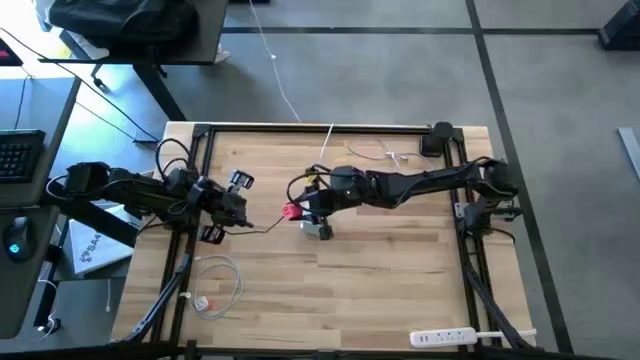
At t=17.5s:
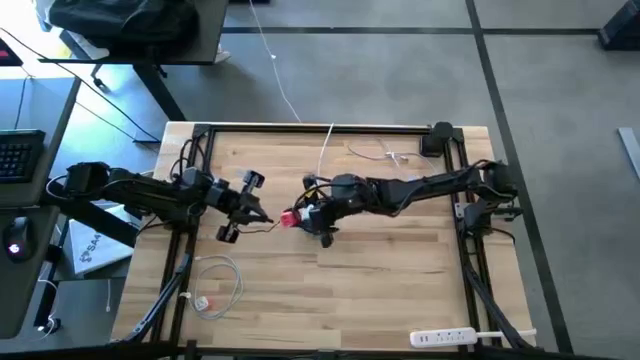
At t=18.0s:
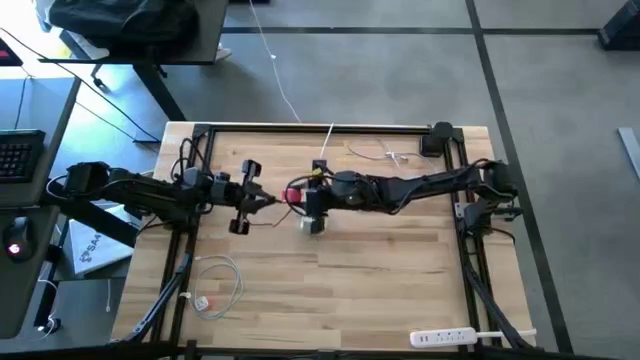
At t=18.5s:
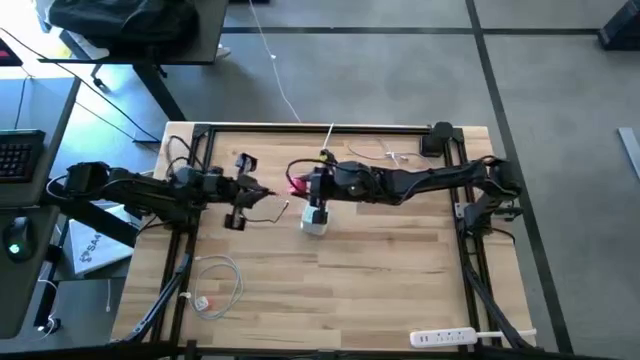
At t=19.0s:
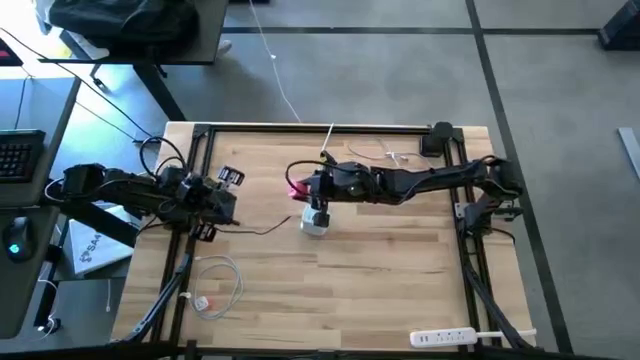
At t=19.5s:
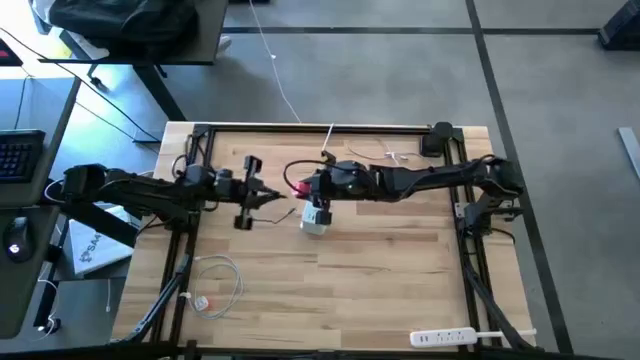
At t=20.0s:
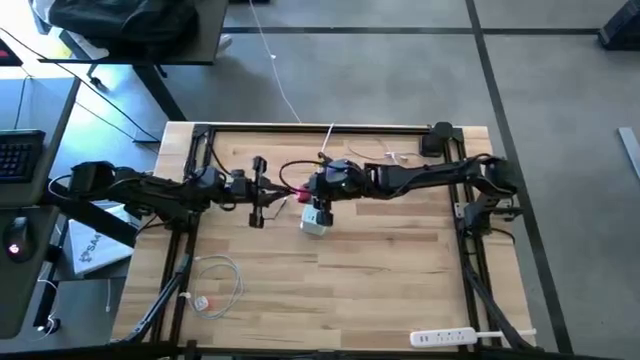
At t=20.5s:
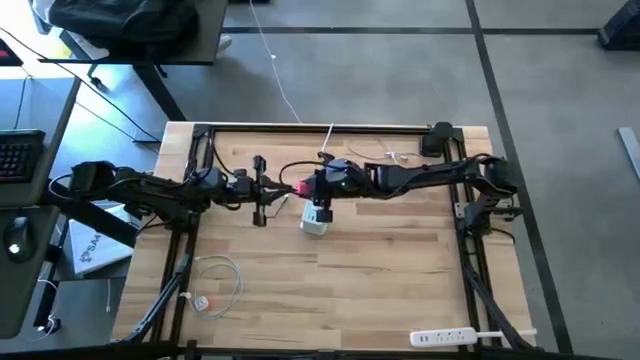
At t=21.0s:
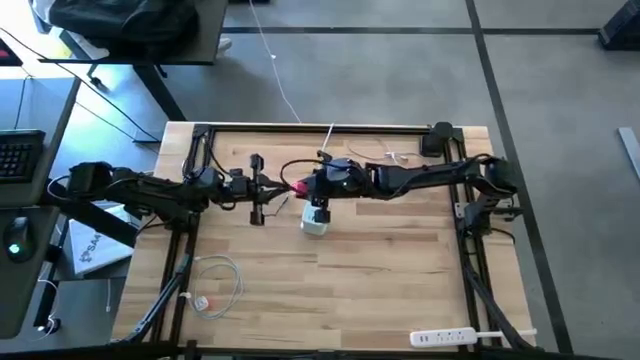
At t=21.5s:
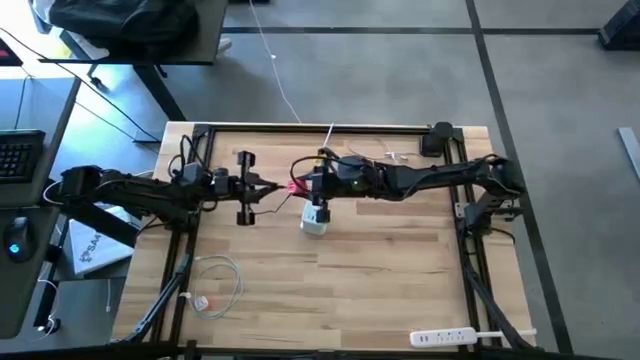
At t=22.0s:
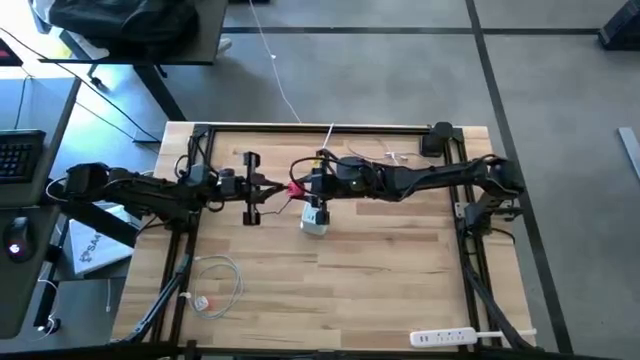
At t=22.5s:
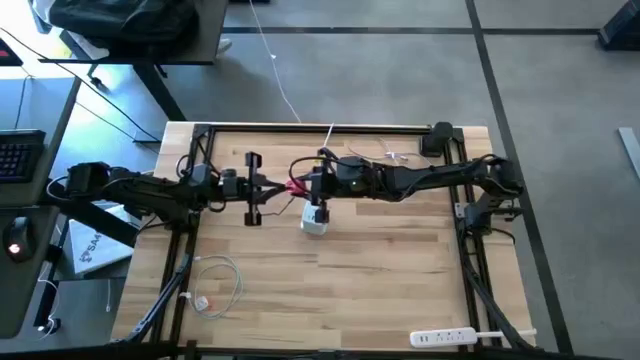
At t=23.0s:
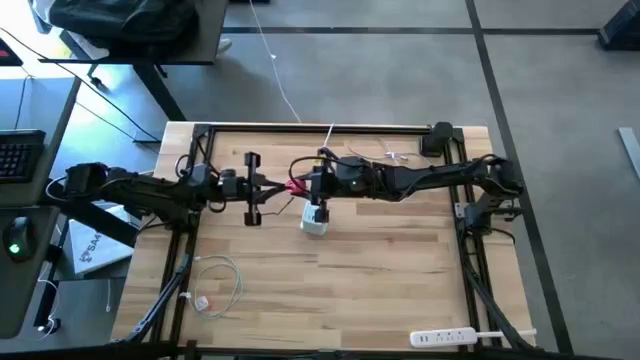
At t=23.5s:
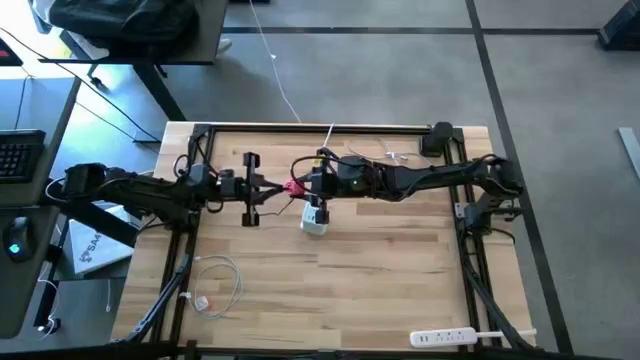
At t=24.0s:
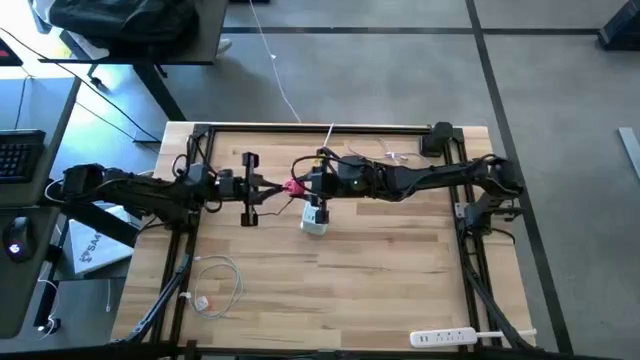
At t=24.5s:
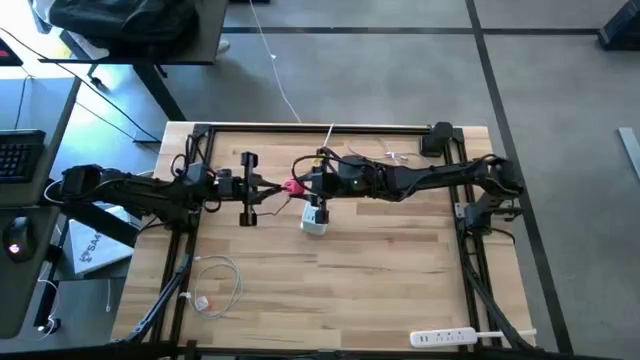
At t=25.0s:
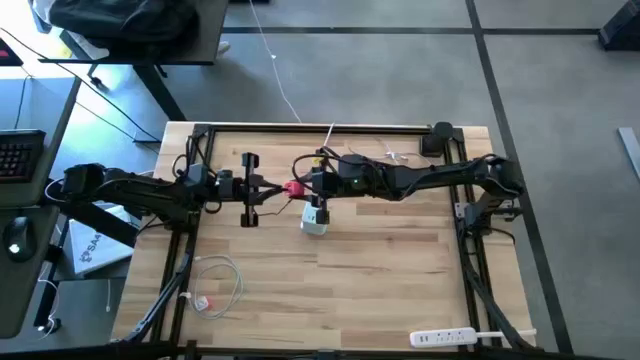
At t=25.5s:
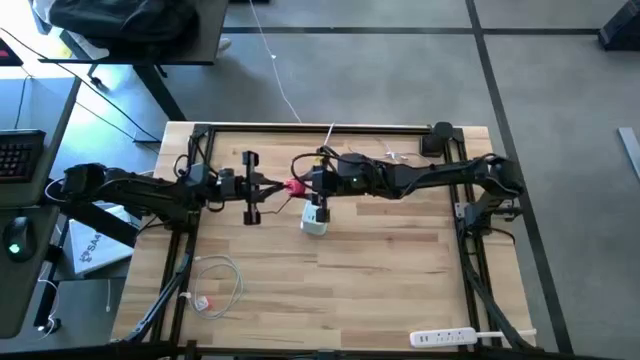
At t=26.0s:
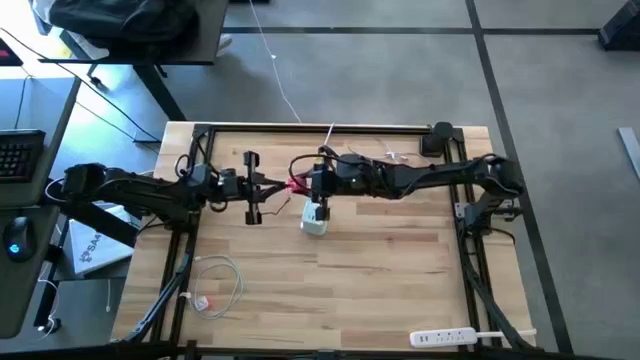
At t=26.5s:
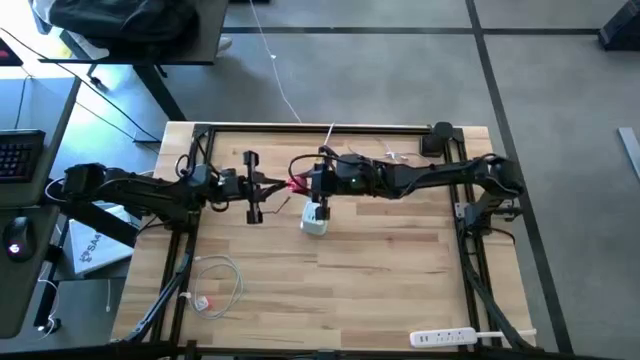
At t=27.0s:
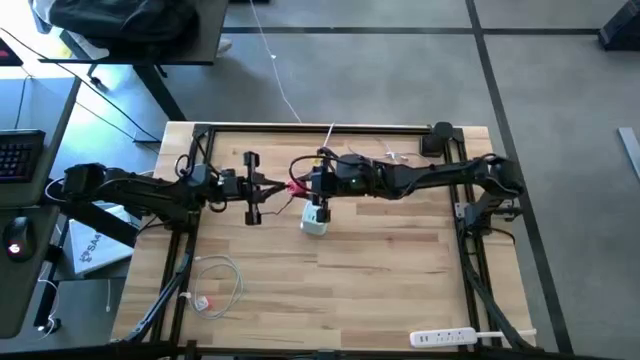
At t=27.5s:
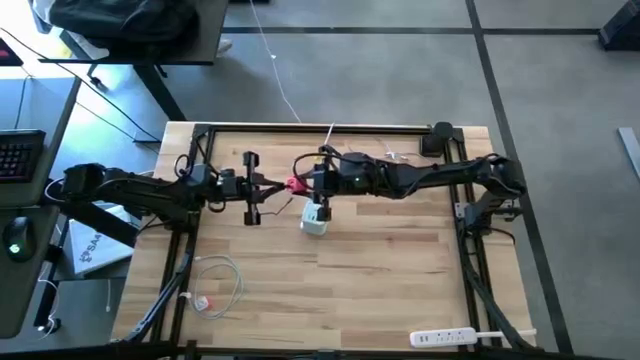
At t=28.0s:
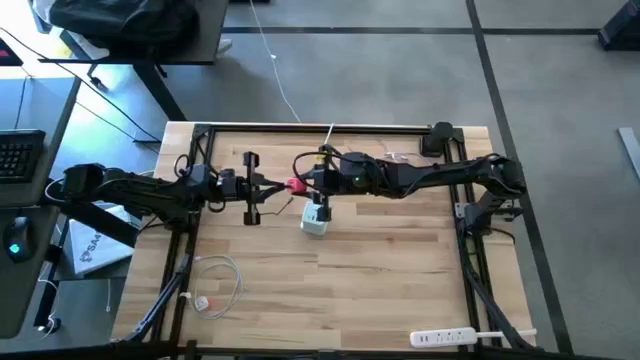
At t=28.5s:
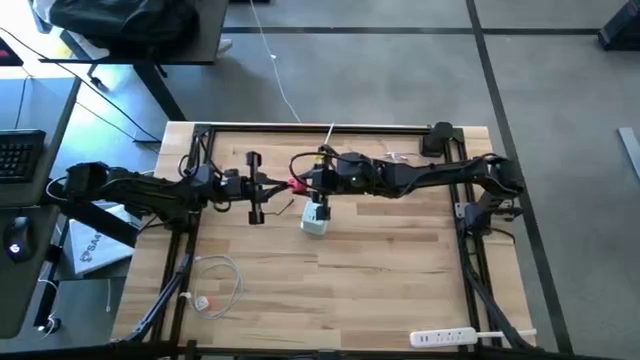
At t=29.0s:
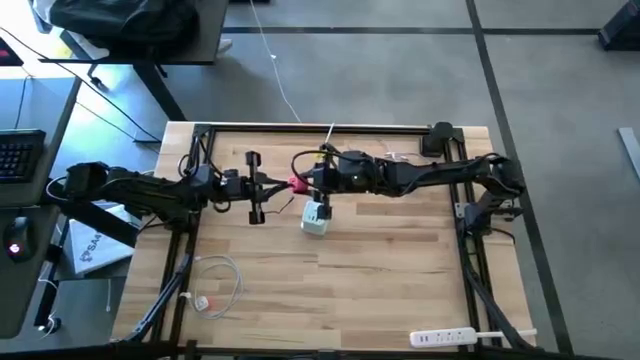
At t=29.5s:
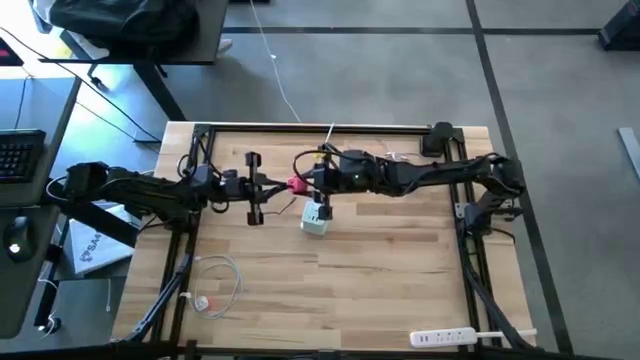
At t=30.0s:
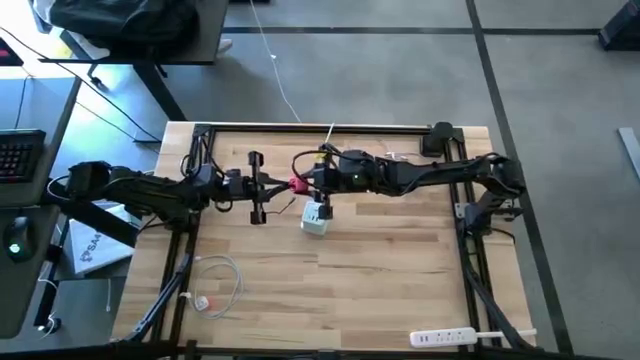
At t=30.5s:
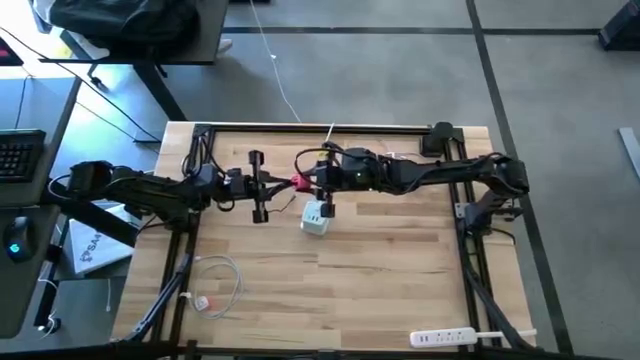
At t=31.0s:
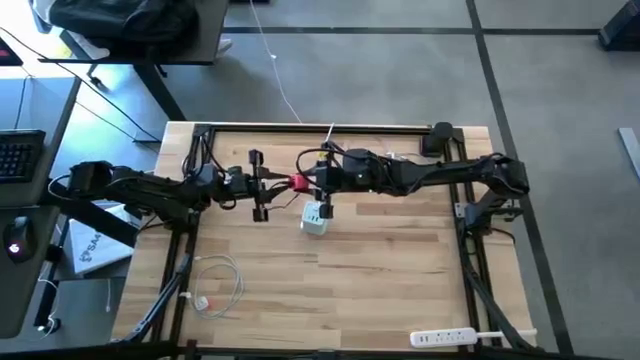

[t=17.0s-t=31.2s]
Task: Insert USB
Insert the black charger cable into the pink charger adapter

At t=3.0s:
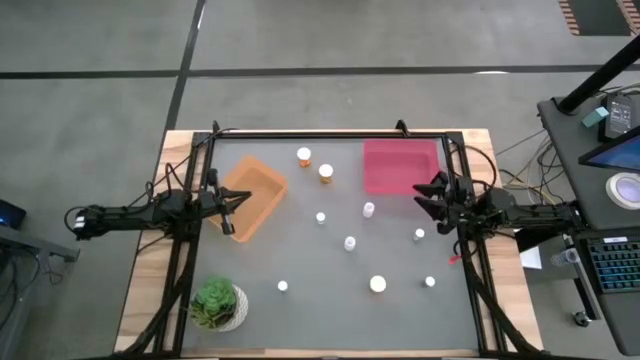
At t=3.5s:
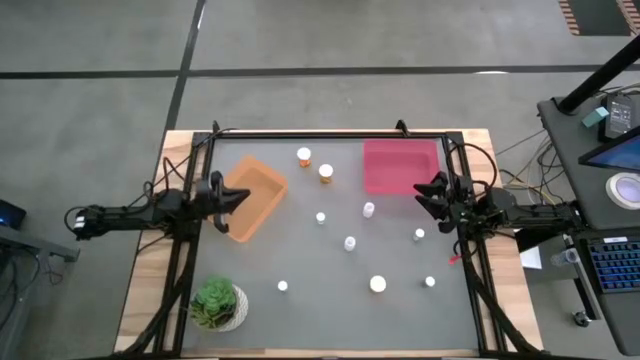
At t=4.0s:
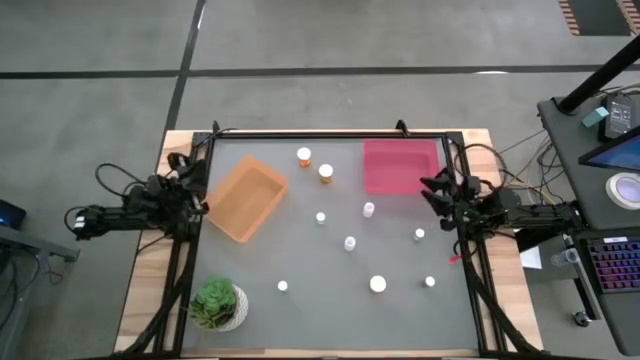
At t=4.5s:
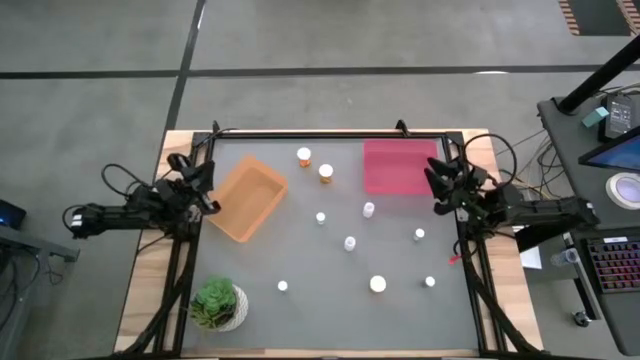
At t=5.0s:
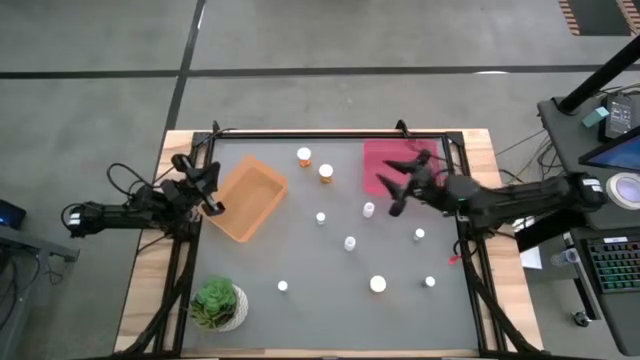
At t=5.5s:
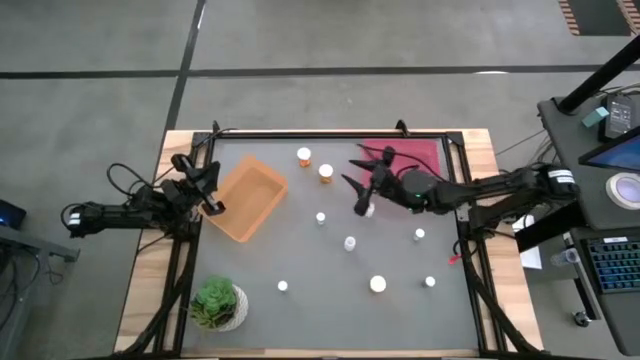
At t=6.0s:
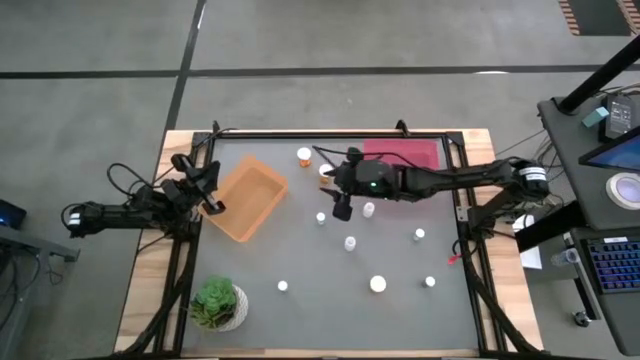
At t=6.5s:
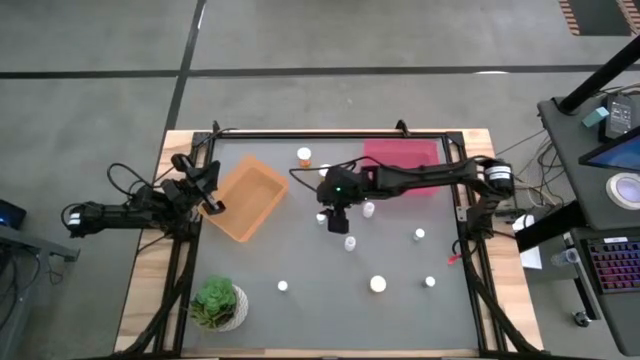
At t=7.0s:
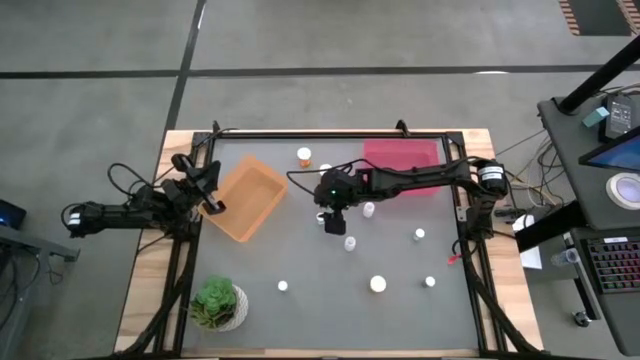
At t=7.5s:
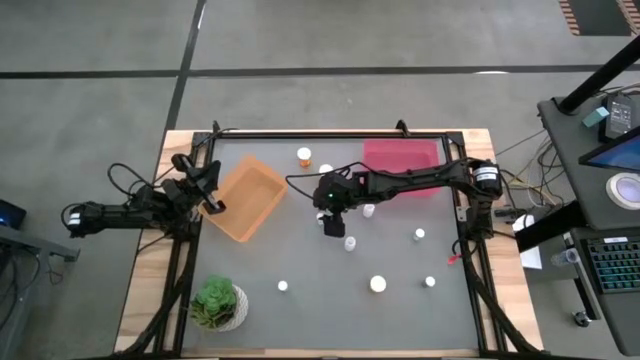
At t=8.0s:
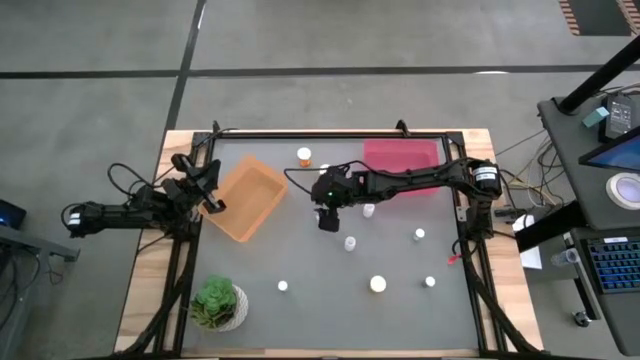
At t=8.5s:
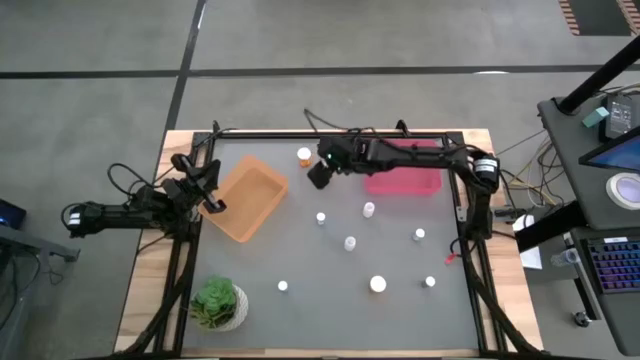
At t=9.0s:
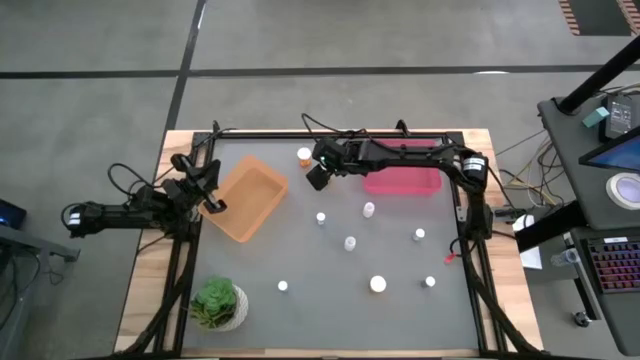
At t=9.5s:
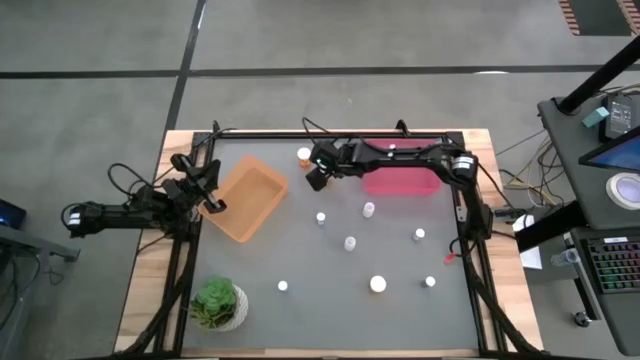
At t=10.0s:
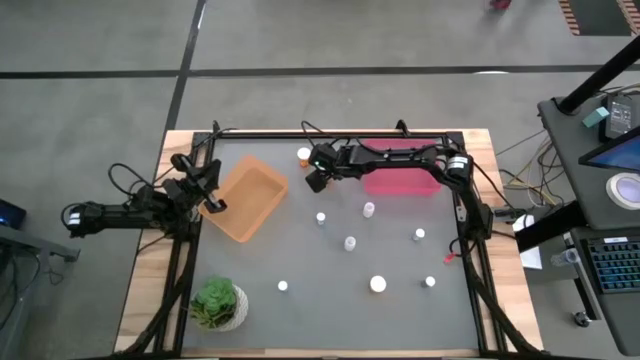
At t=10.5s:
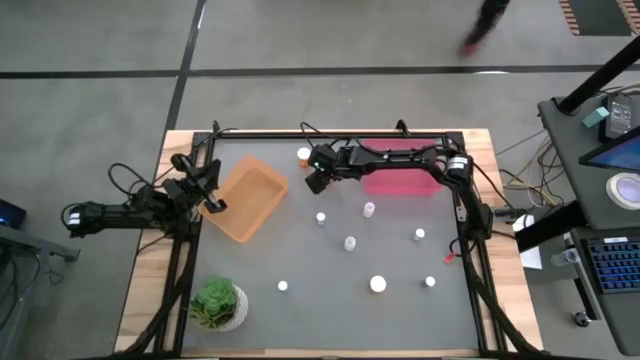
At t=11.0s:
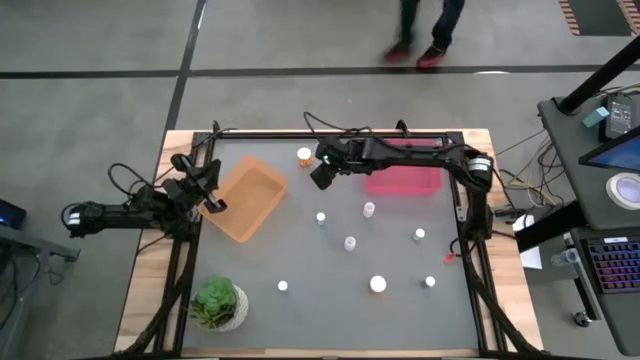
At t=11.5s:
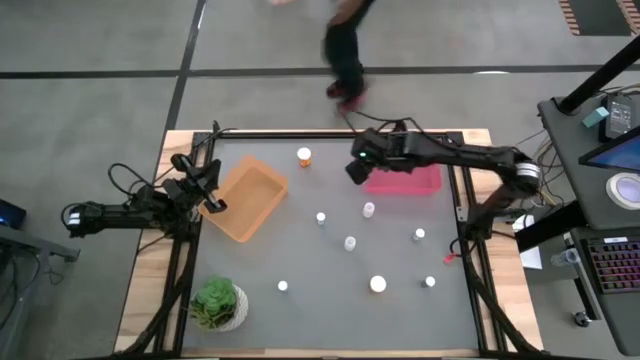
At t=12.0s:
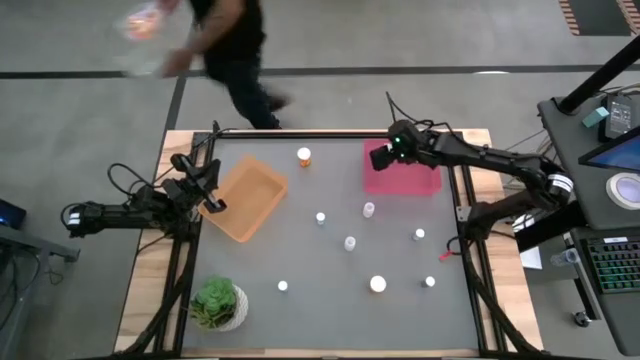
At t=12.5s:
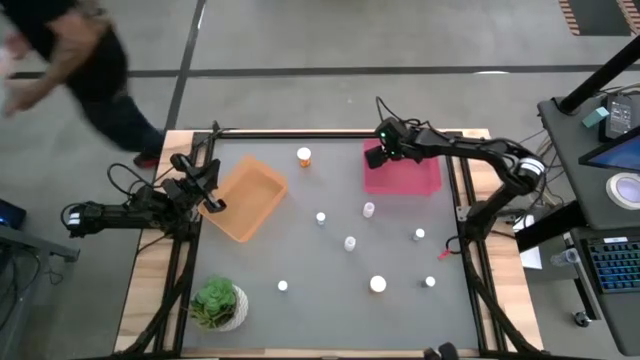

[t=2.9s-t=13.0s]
Task: Pick and place medicine bottles into bin by pill shape (circle, oval)
Put the orange capsule bottle into the pink bin
